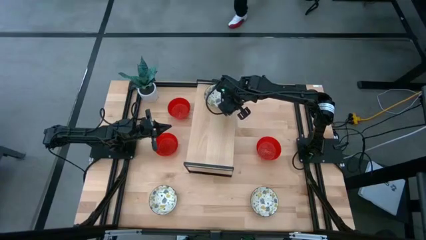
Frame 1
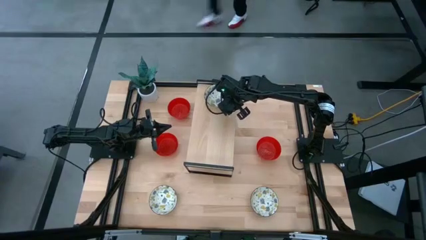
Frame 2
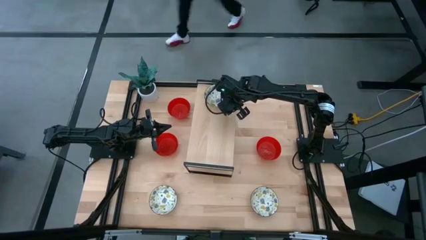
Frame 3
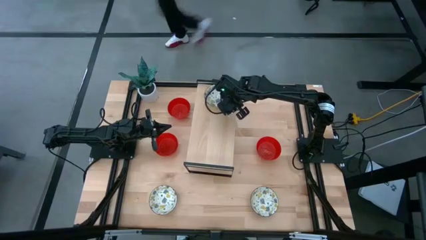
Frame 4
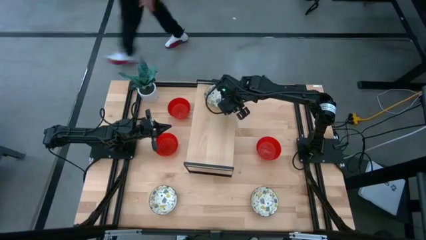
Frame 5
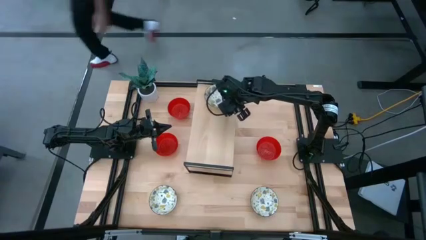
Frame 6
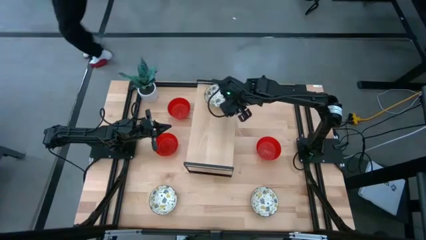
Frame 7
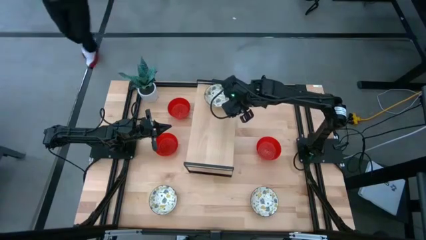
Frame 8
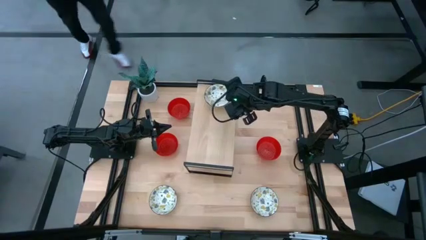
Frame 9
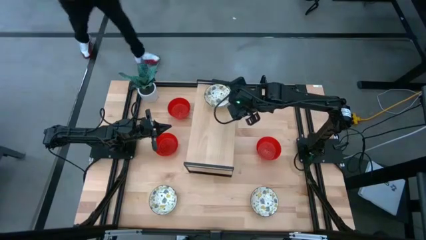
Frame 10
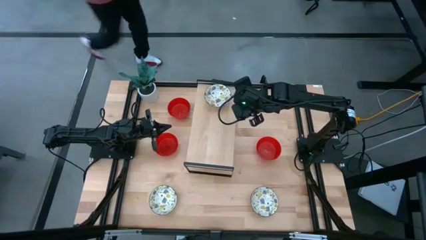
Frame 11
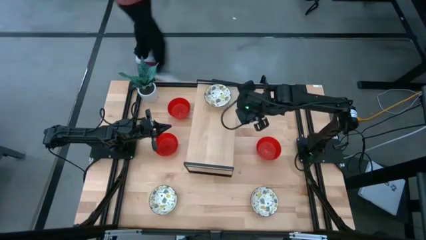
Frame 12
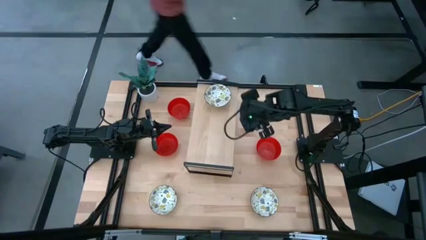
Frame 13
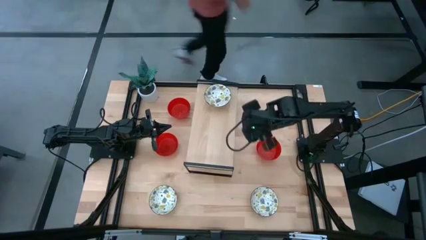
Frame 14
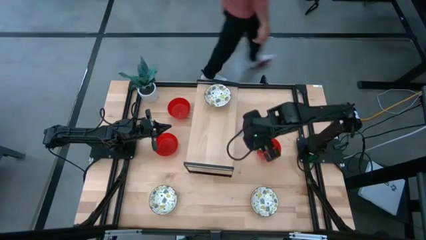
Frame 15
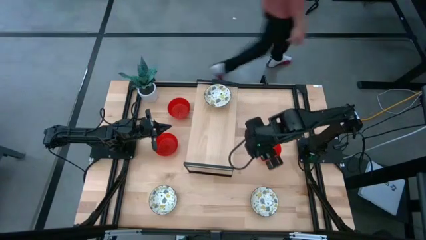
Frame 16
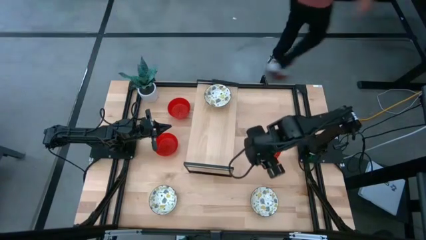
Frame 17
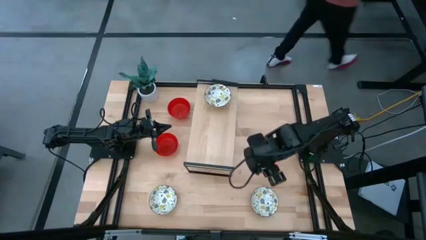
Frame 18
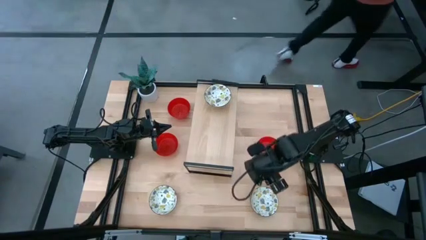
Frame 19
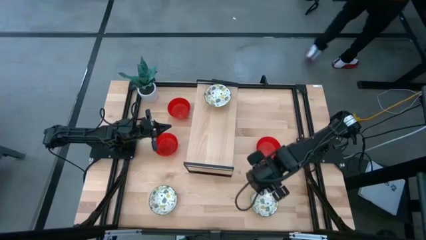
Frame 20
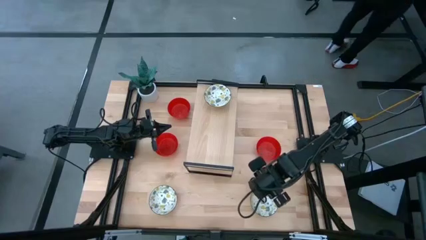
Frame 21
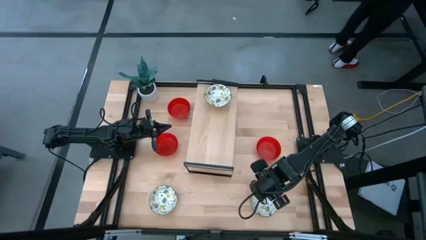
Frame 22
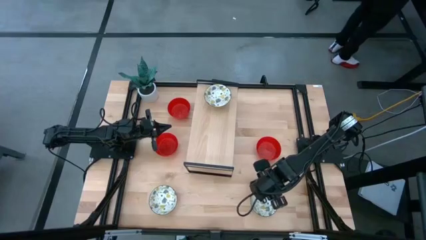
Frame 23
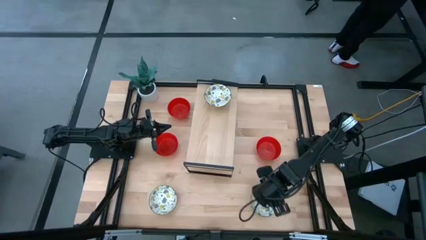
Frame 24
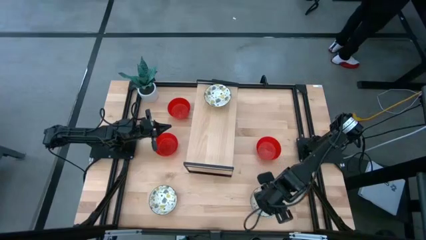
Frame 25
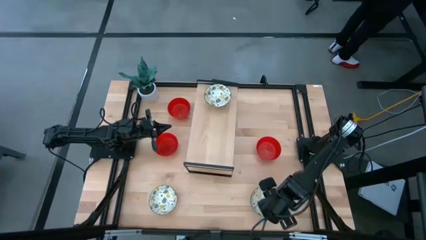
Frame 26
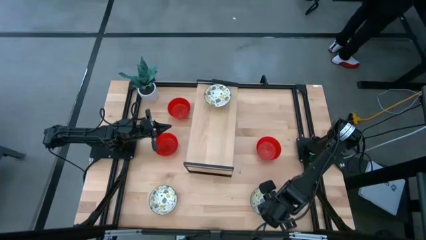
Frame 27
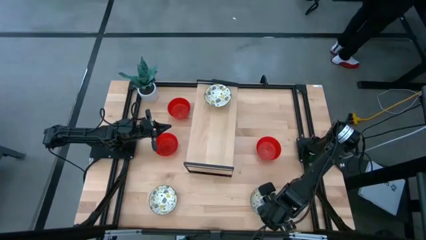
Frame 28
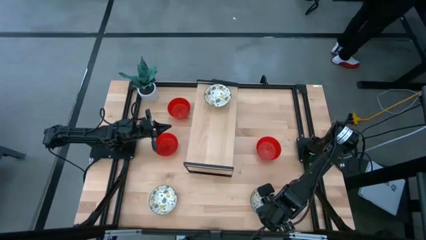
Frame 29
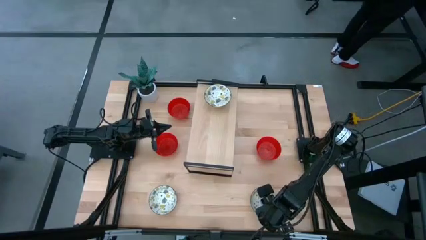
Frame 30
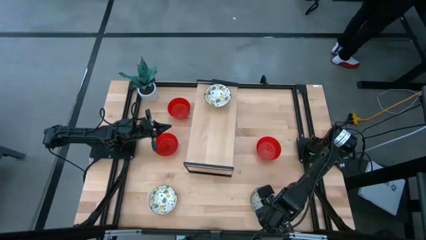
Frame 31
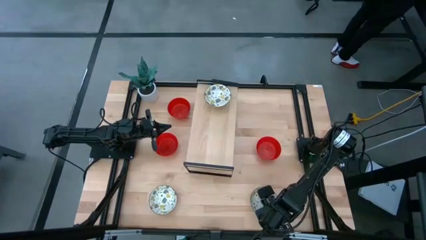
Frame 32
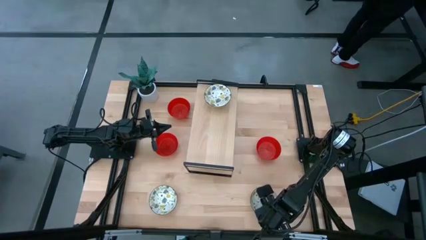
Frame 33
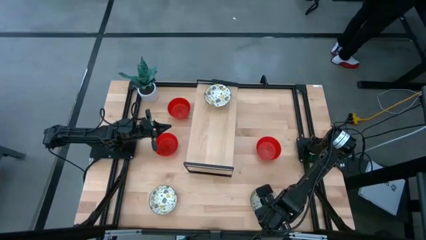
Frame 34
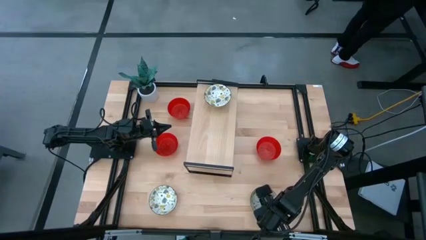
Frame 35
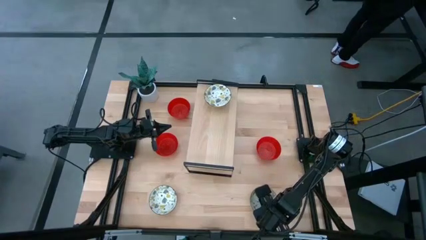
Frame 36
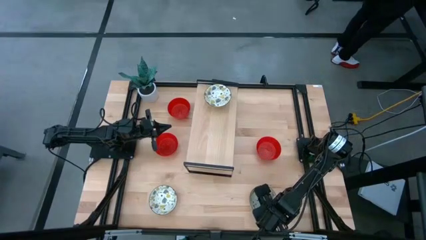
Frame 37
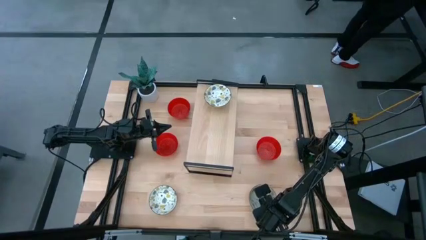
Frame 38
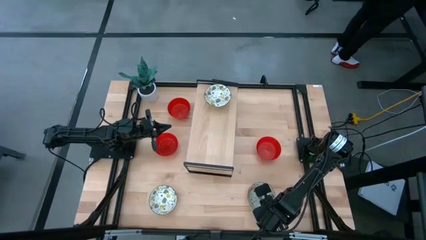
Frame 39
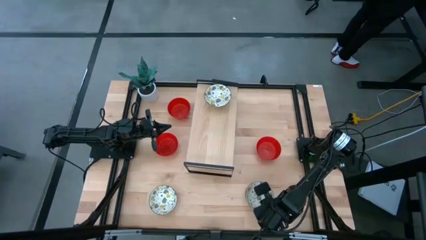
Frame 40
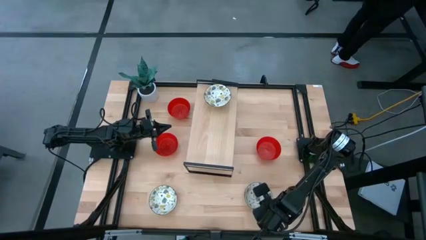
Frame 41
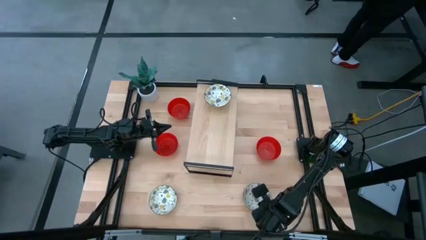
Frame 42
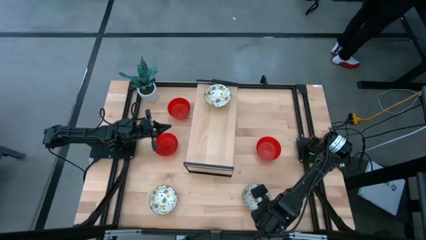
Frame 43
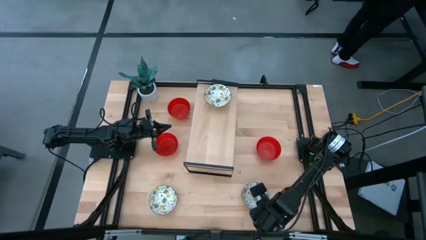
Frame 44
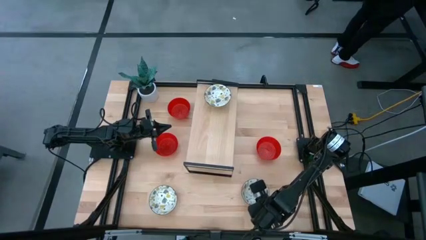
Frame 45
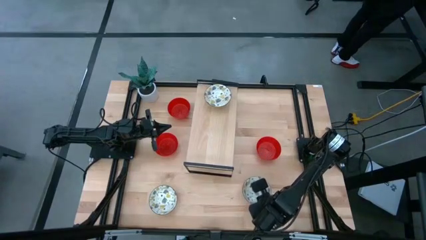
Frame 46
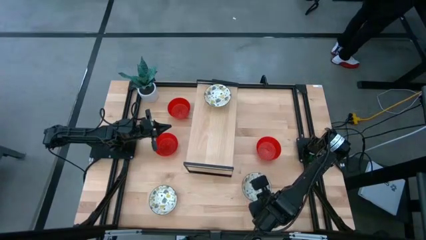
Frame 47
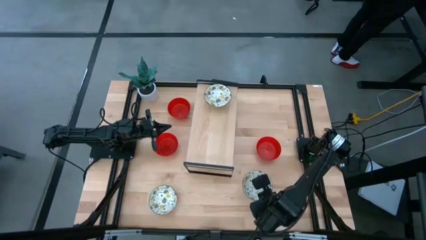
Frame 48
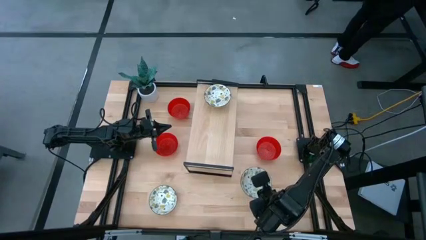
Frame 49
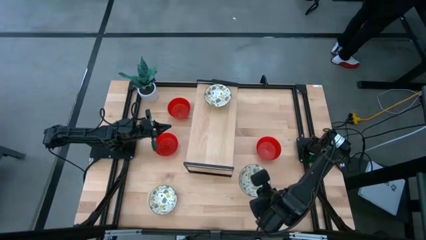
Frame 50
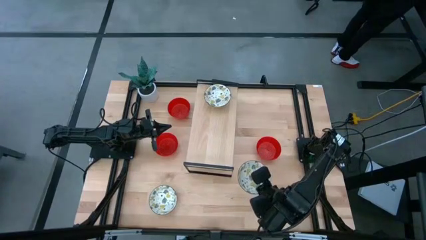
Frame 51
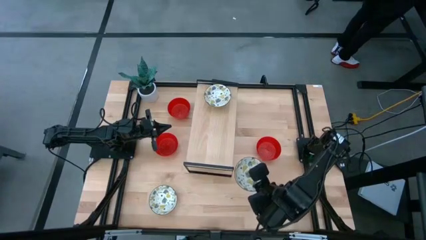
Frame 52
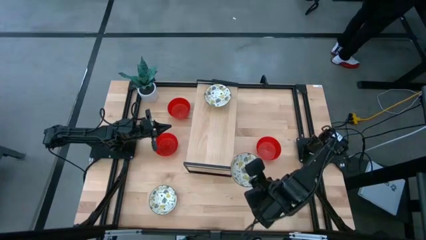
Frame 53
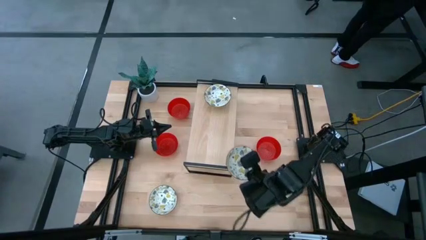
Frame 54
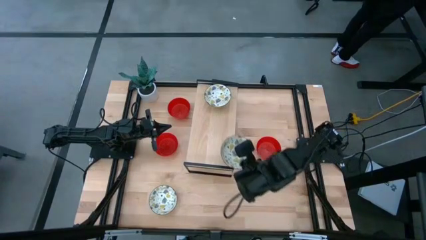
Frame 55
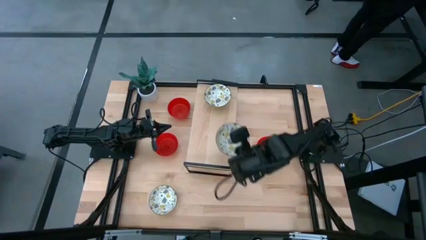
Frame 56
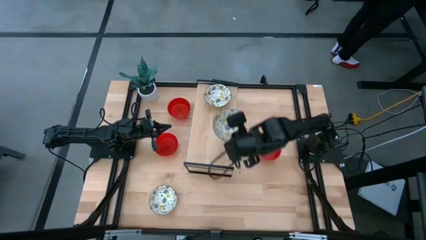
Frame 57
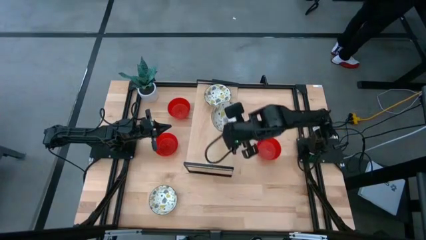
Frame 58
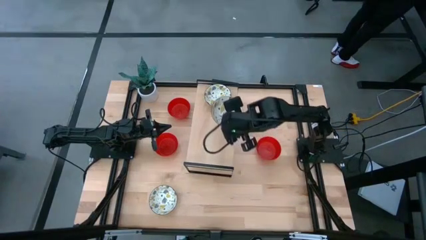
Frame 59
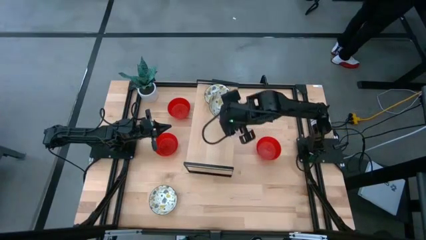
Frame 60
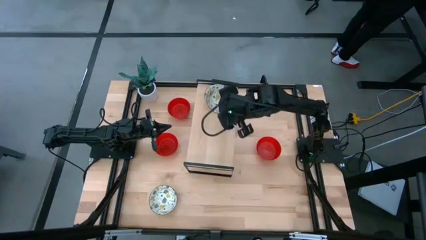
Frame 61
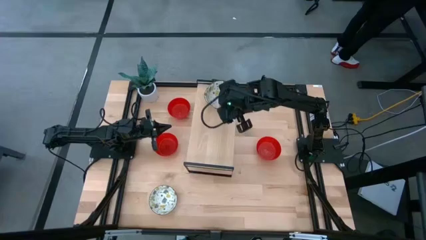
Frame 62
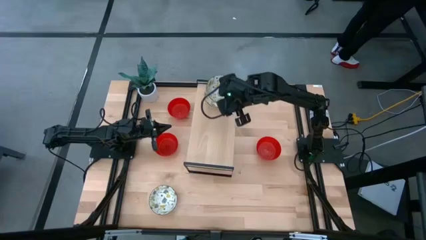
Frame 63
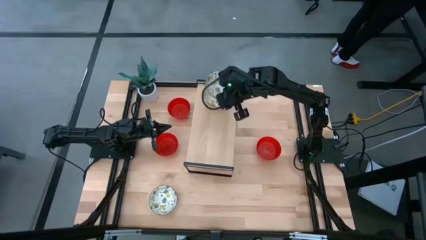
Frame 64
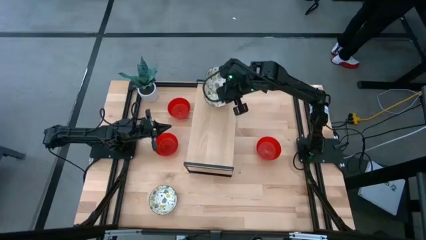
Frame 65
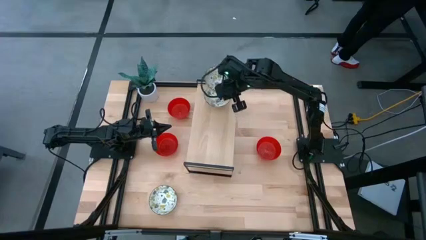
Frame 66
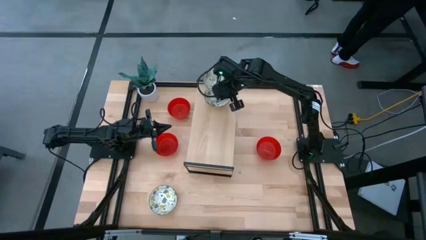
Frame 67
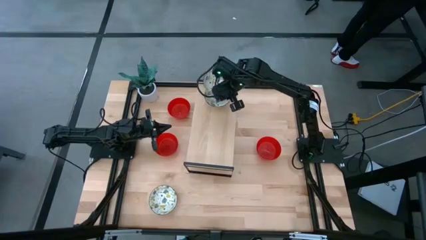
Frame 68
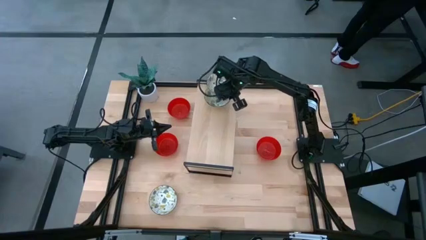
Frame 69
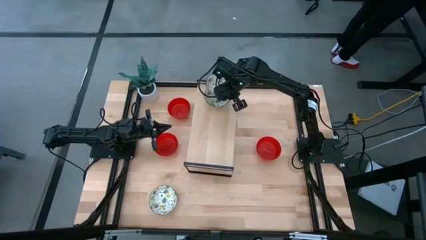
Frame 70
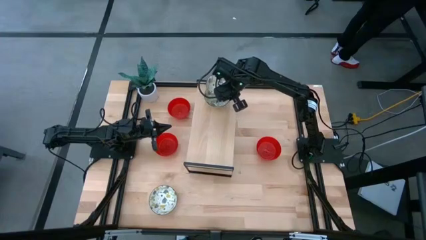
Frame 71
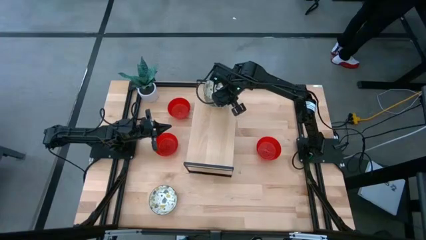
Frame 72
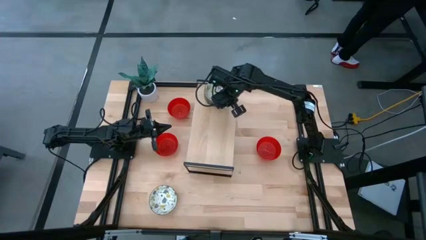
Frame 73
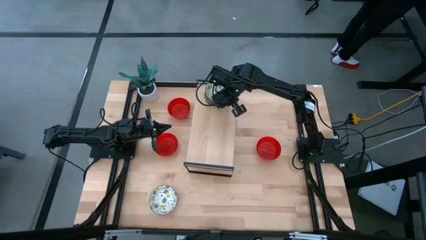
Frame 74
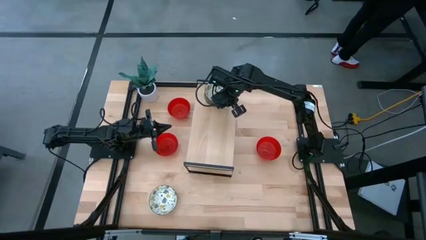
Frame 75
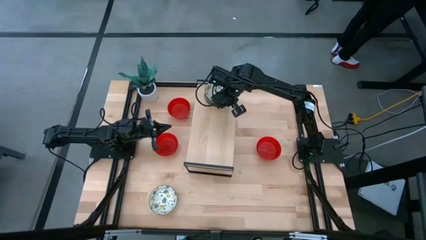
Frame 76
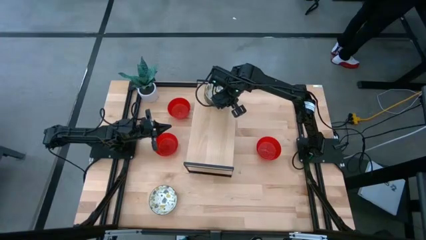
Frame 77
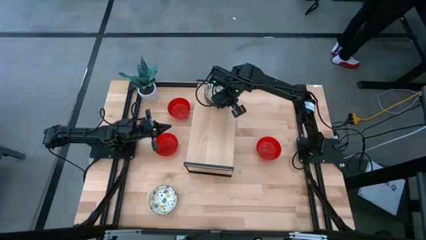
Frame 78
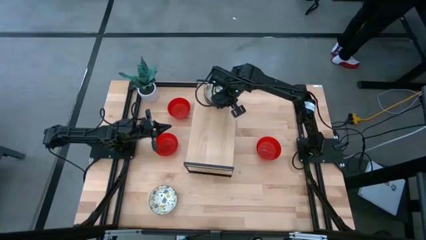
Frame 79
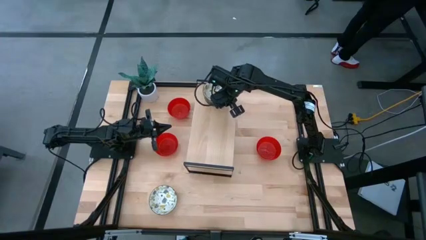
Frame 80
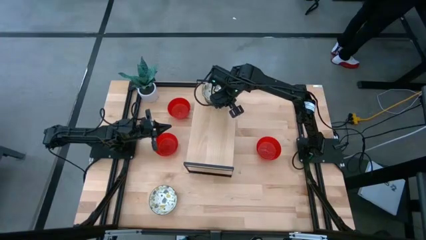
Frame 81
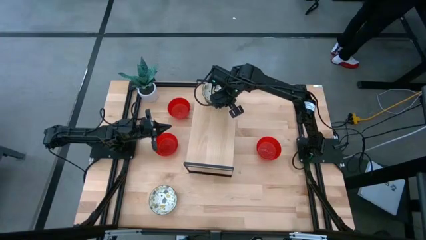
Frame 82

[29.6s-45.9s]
Task: Pick & Place Mini bowls
Stack the right white patterned bowl on top of the white patterned bowl on the shelf
